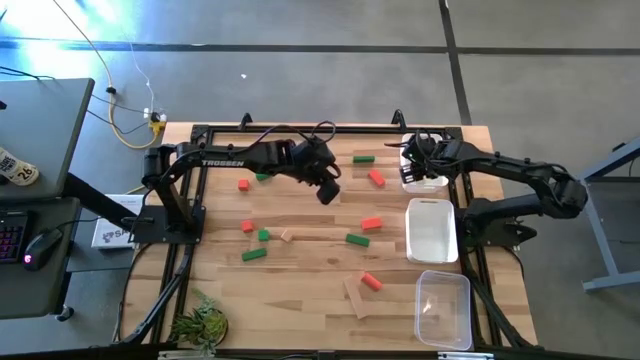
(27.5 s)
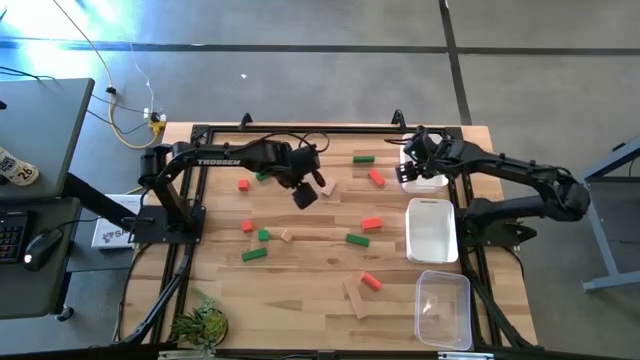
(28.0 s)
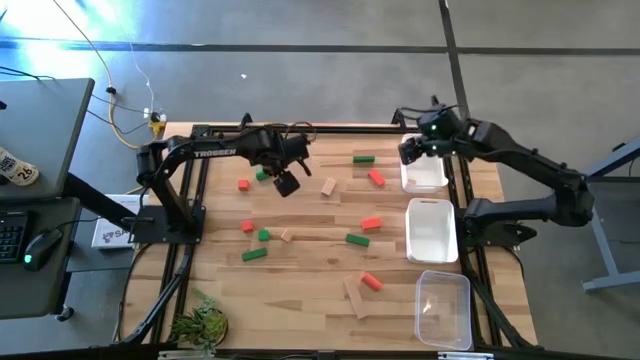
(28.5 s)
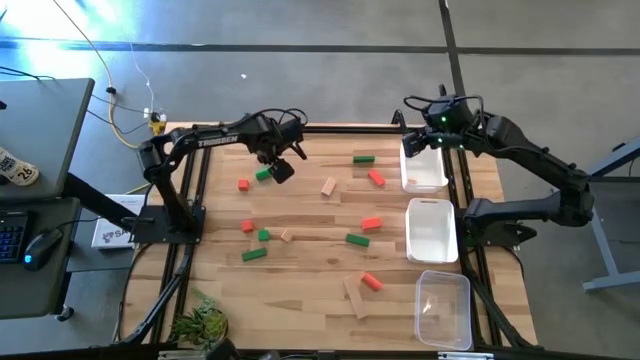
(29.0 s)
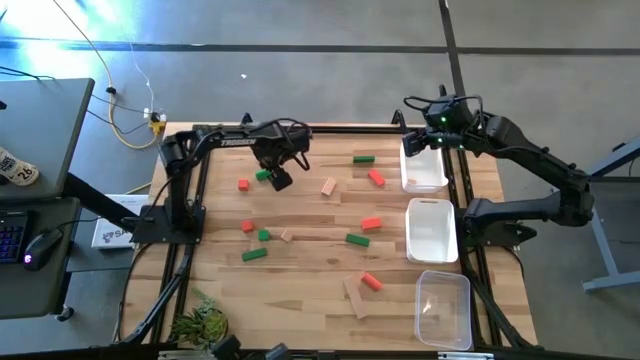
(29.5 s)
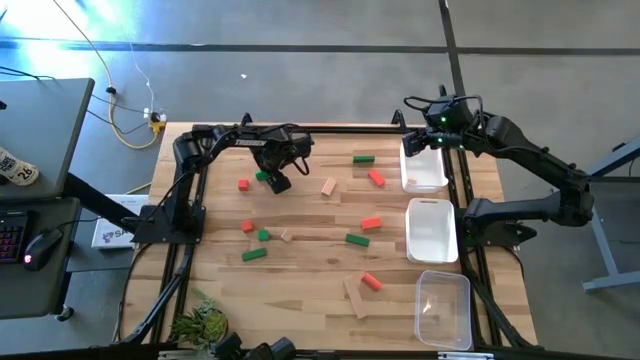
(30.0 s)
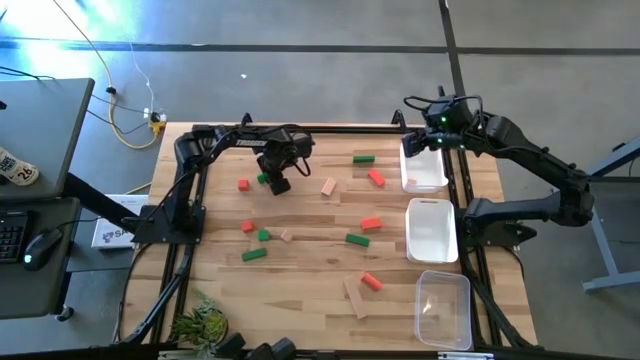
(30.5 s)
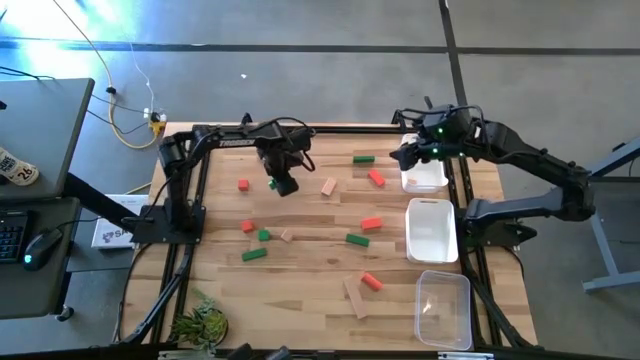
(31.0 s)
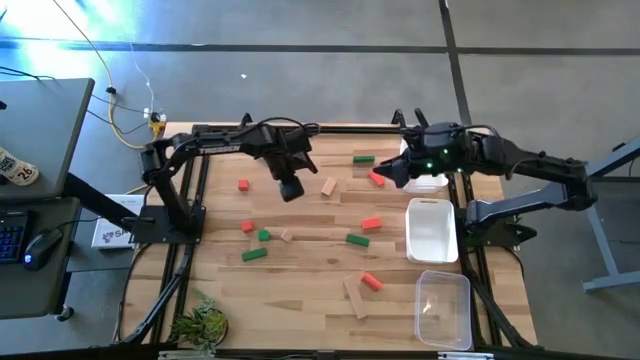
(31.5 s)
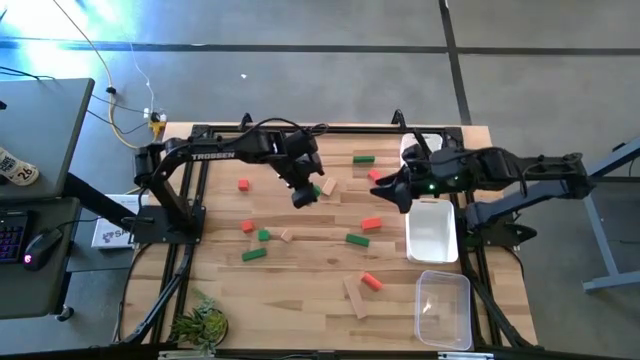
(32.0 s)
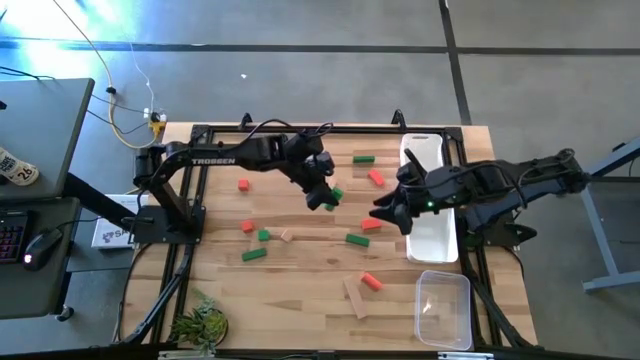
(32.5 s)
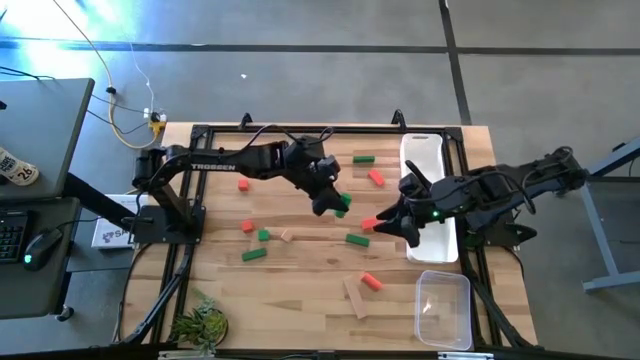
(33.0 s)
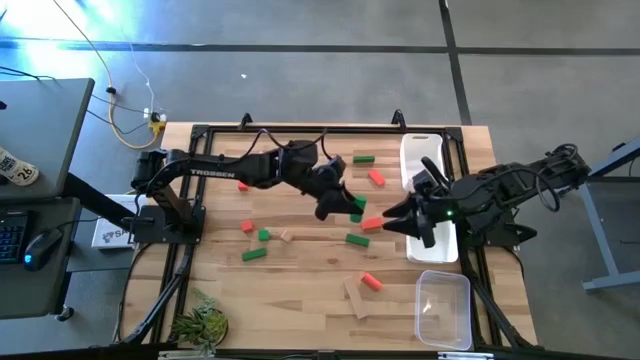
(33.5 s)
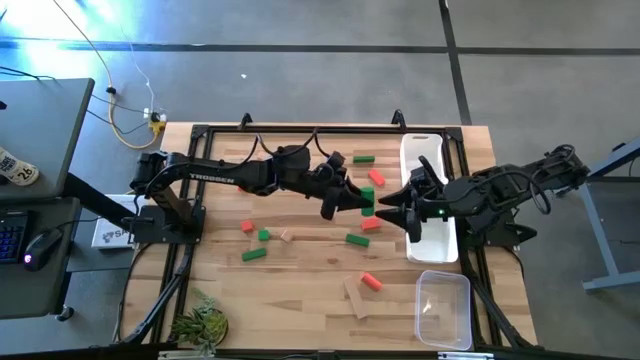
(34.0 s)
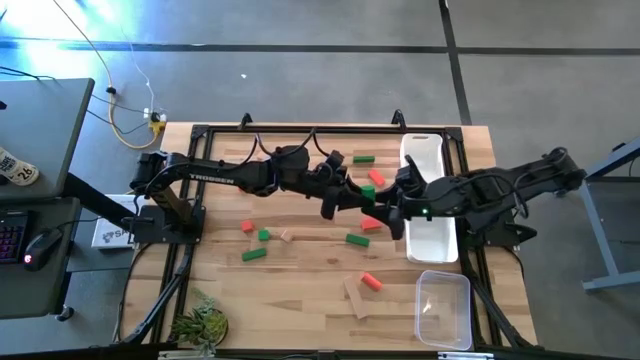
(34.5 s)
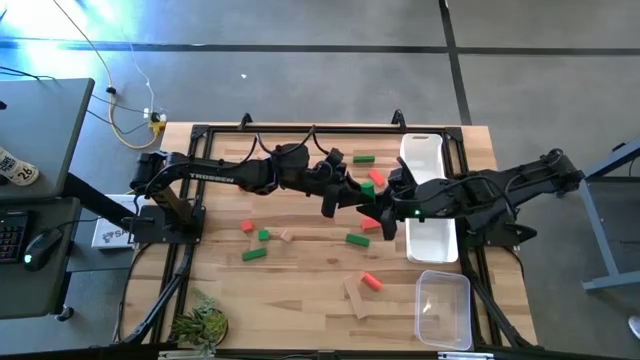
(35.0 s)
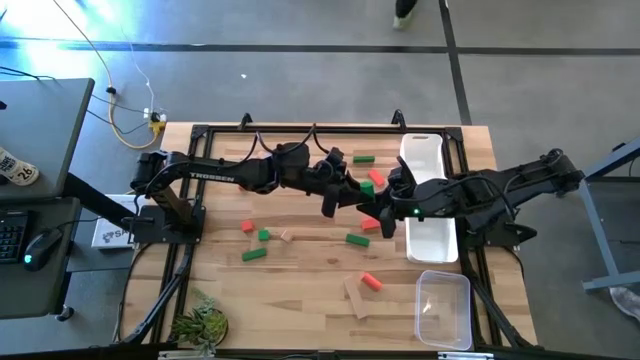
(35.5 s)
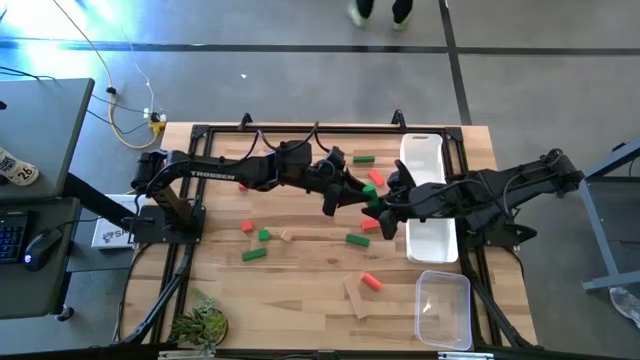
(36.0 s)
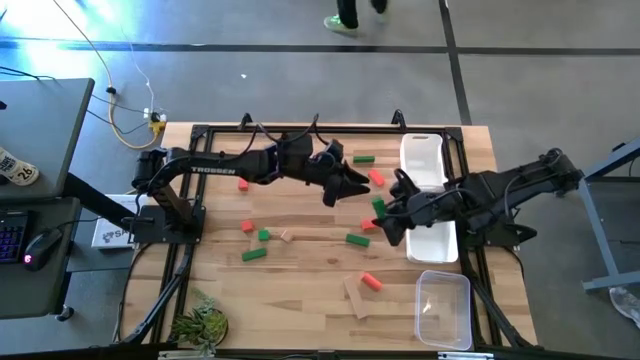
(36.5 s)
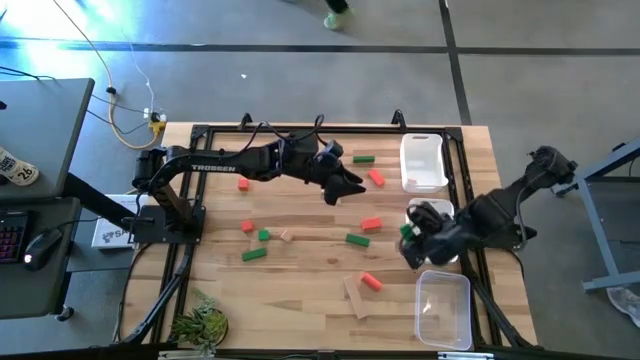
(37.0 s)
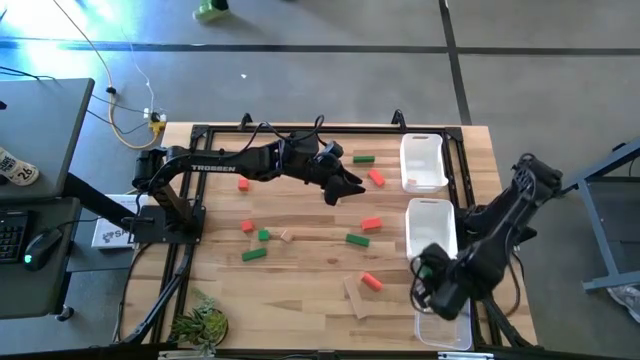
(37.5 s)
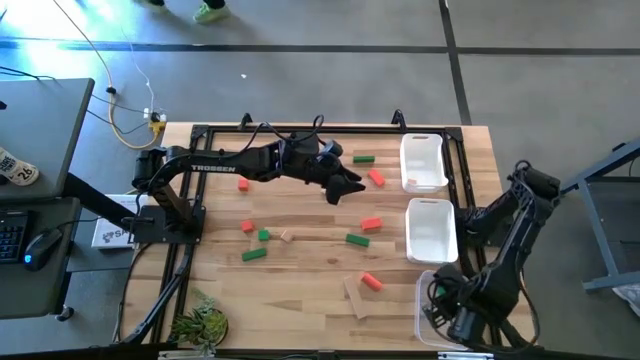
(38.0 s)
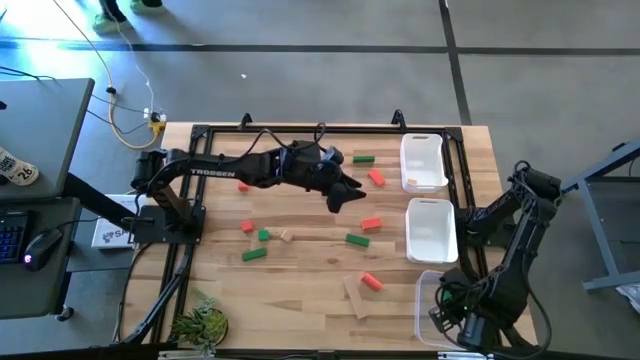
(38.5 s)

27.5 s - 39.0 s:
Task: Sort & place blocks by color
Put the green block into the transparent bin

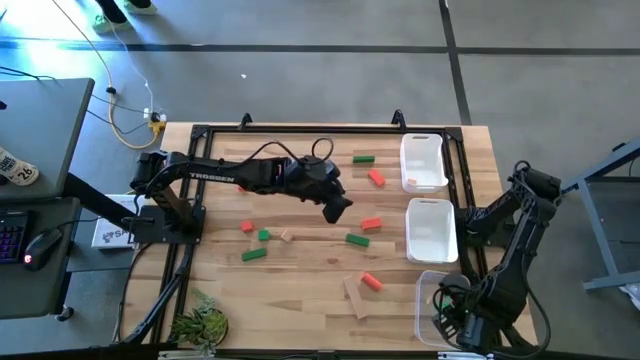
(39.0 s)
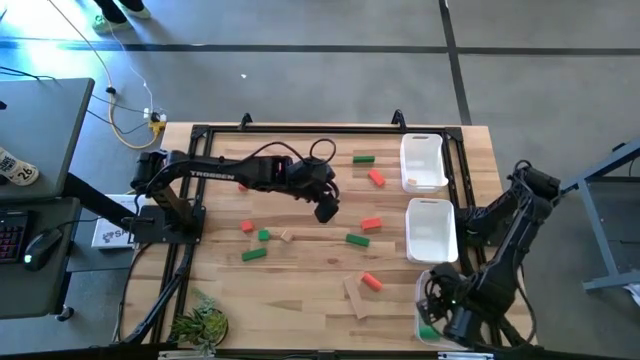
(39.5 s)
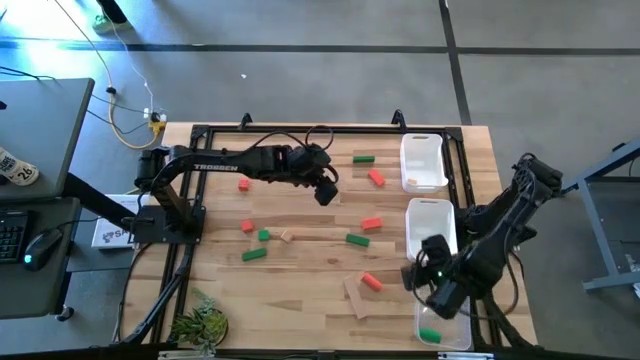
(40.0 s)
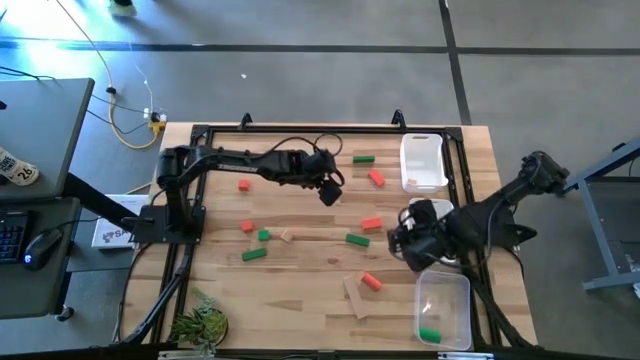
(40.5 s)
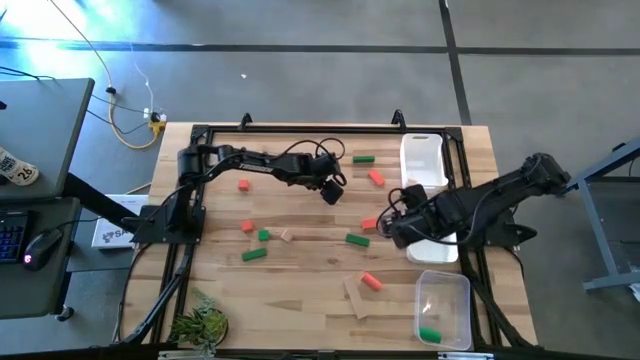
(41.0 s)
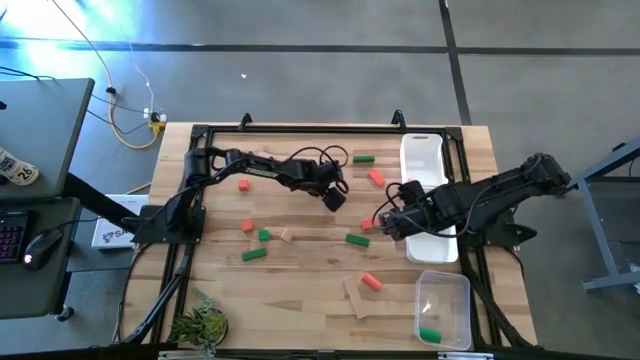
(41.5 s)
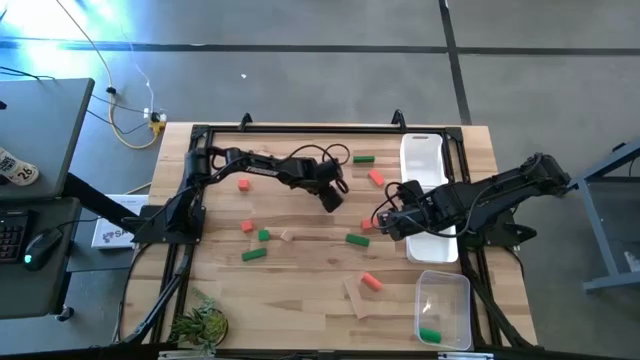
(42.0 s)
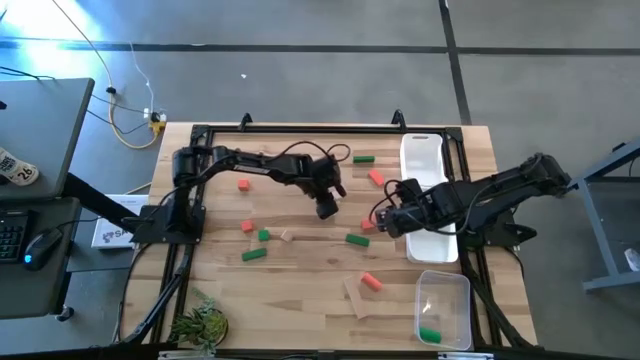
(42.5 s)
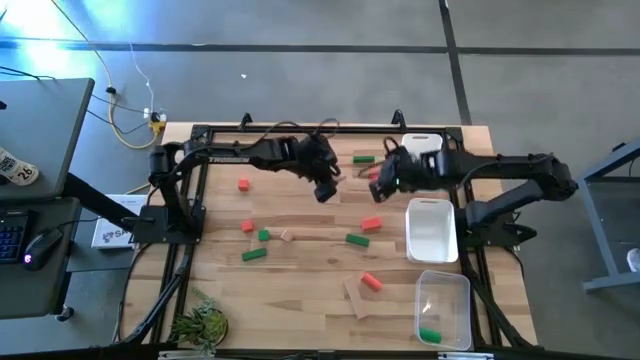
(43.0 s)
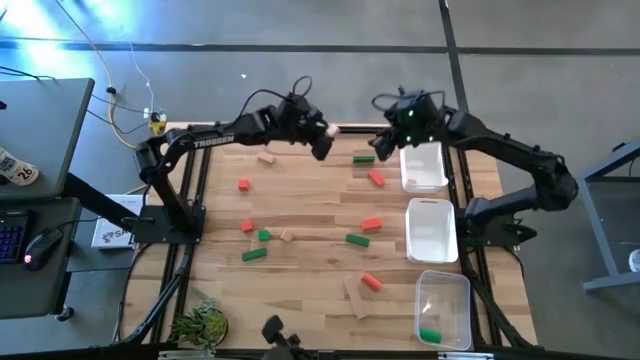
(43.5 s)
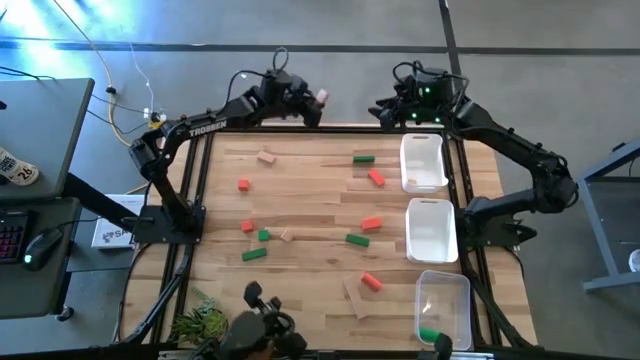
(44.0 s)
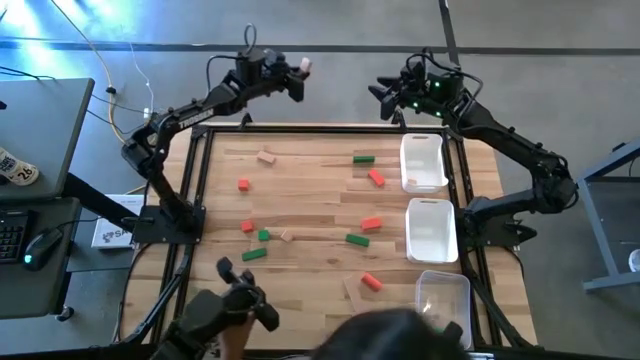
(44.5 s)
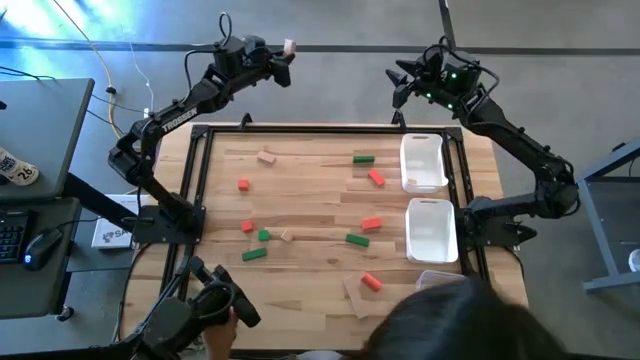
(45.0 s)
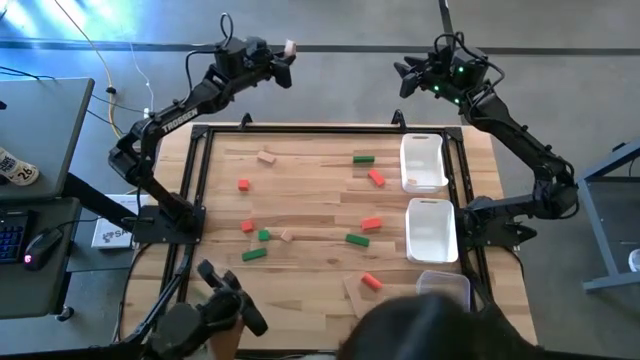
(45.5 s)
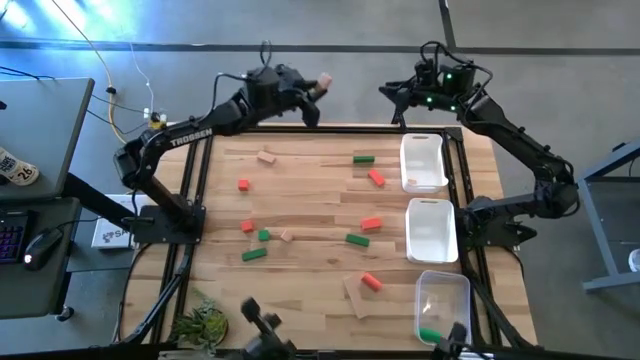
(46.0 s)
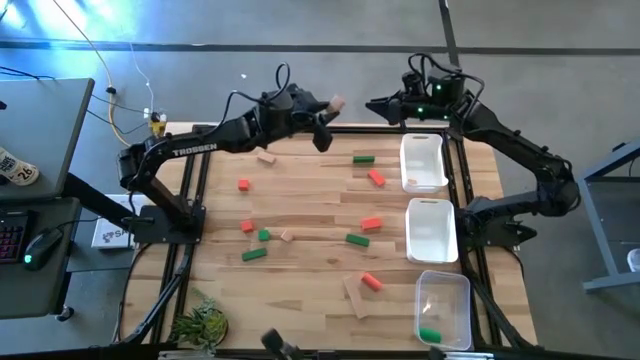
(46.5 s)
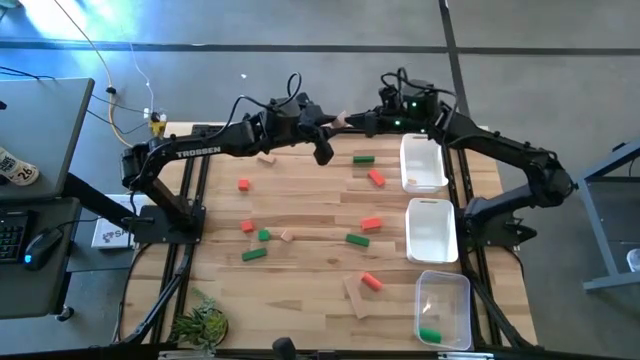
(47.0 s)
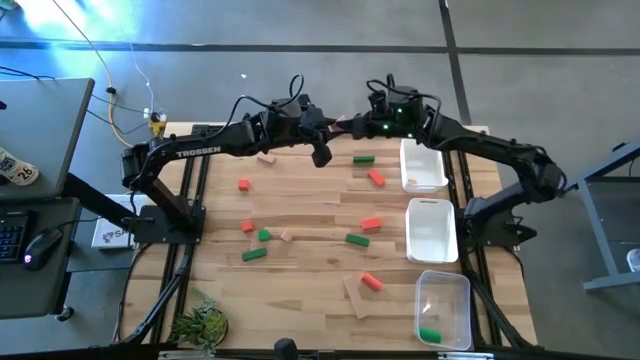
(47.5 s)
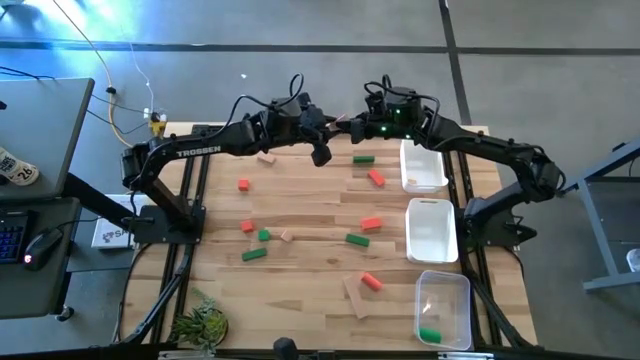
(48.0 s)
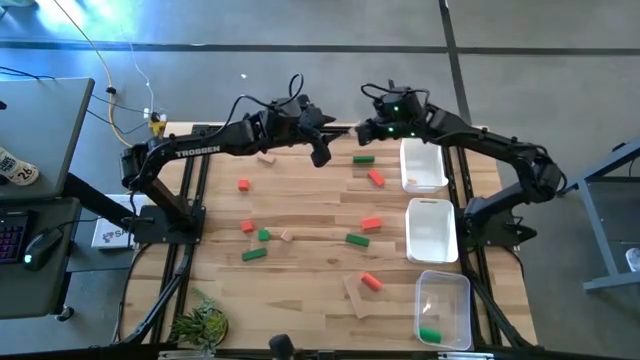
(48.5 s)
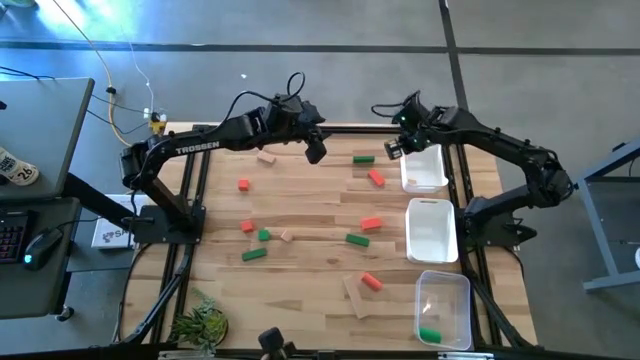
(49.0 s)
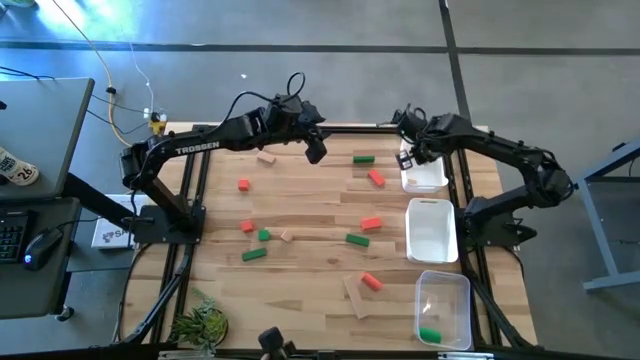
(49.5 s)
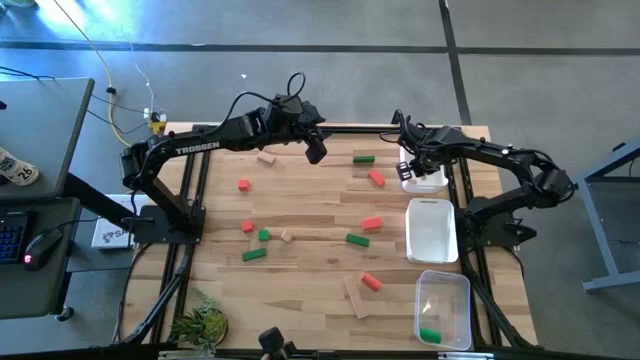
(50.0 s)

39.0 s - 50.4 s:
Put the brown block into the top white bin
